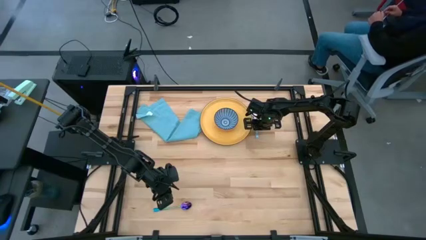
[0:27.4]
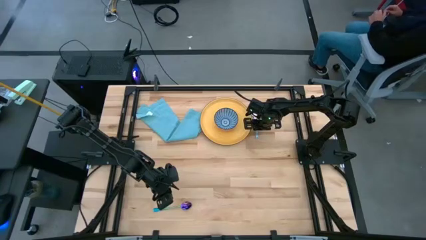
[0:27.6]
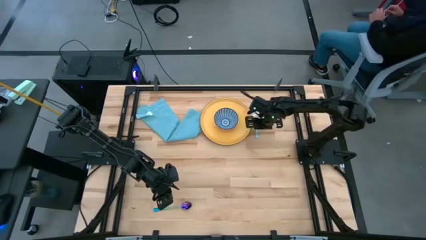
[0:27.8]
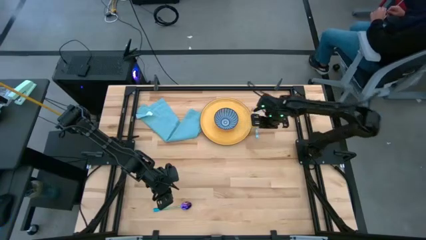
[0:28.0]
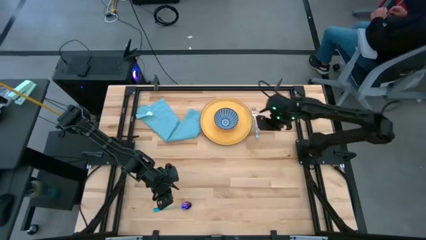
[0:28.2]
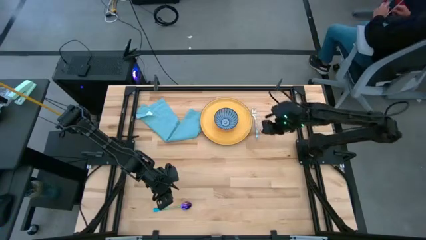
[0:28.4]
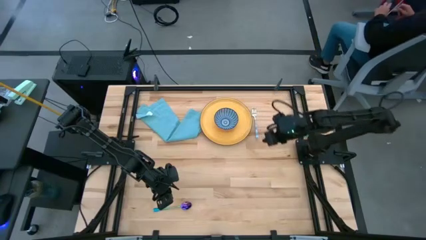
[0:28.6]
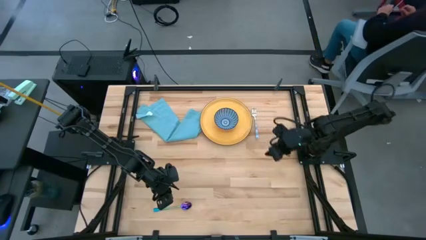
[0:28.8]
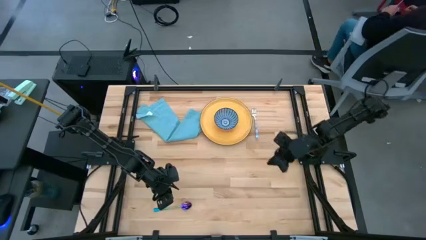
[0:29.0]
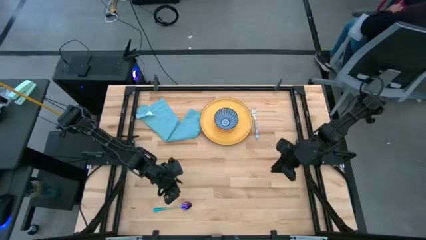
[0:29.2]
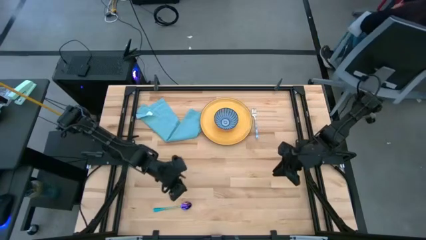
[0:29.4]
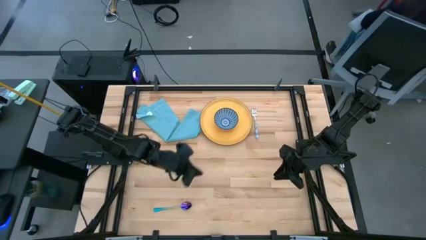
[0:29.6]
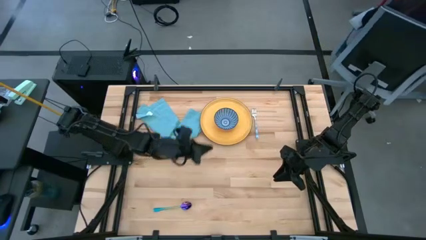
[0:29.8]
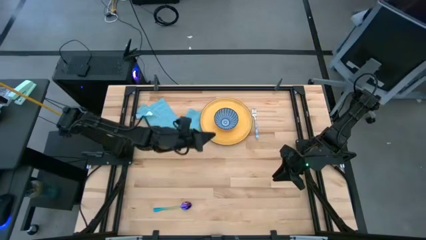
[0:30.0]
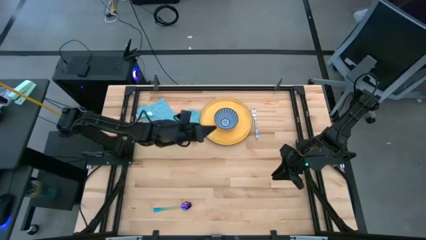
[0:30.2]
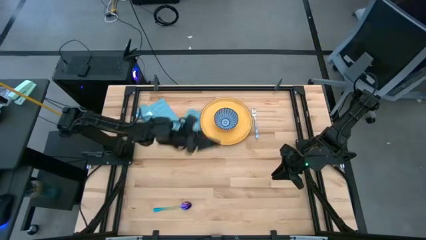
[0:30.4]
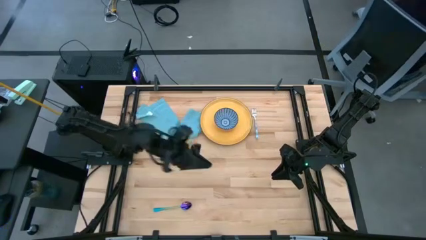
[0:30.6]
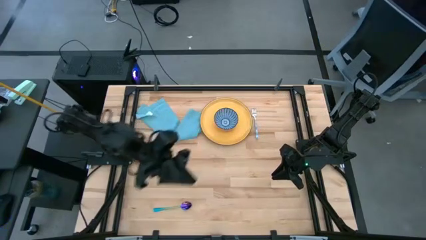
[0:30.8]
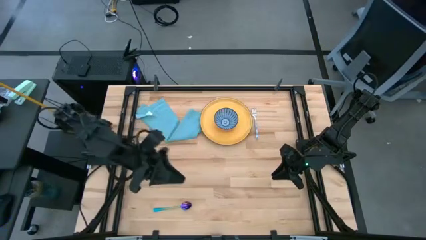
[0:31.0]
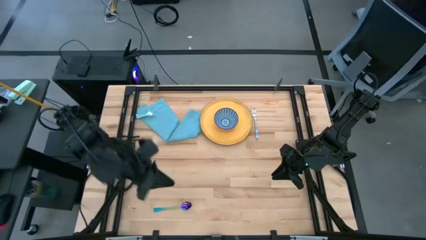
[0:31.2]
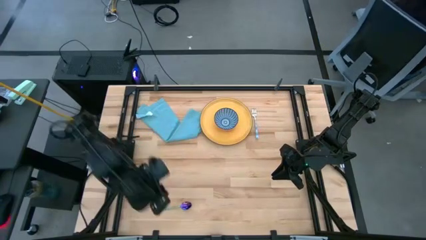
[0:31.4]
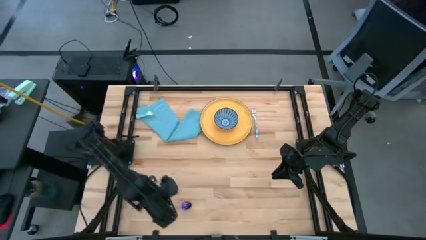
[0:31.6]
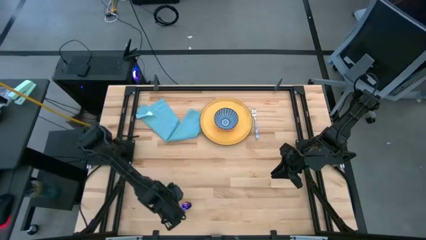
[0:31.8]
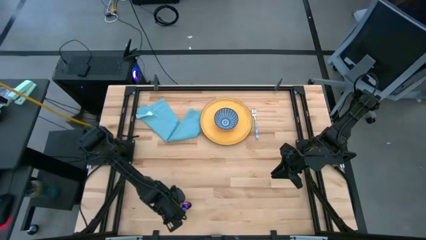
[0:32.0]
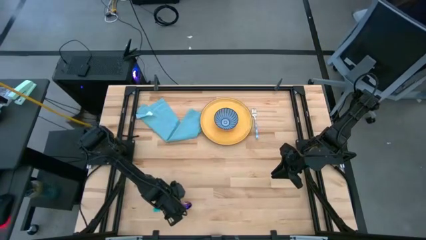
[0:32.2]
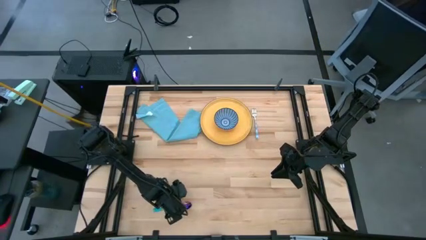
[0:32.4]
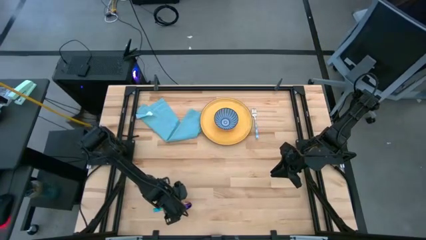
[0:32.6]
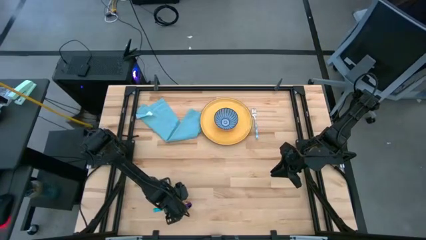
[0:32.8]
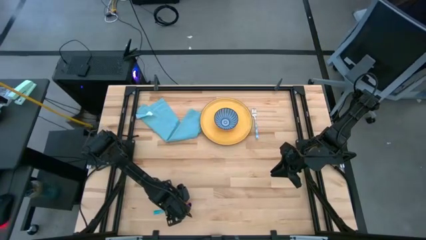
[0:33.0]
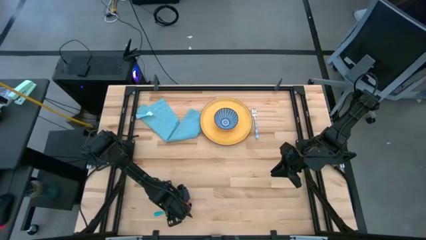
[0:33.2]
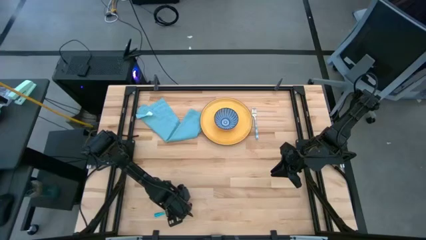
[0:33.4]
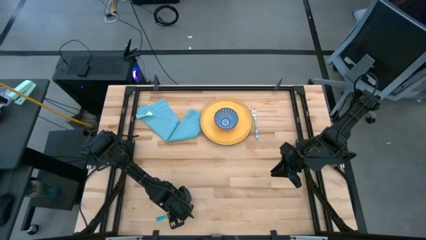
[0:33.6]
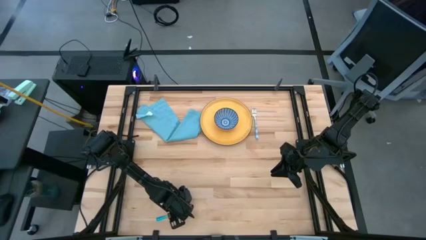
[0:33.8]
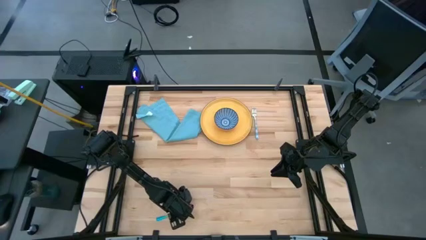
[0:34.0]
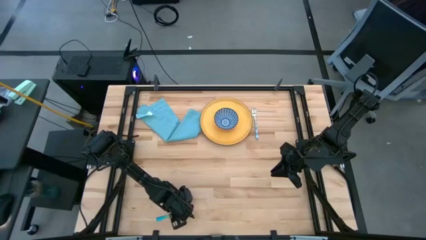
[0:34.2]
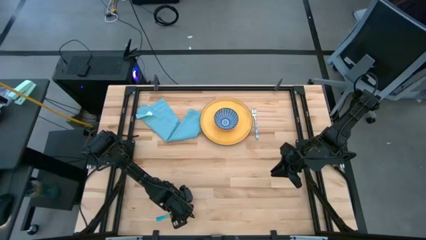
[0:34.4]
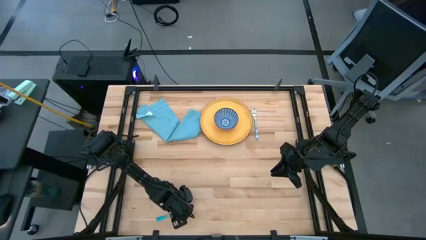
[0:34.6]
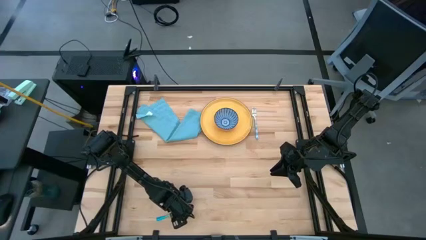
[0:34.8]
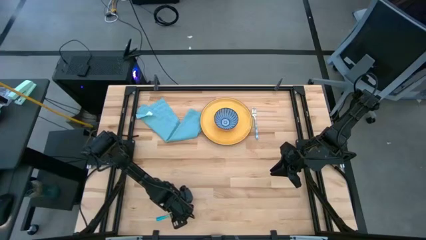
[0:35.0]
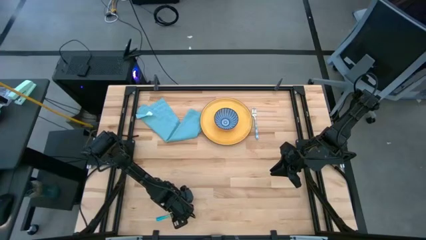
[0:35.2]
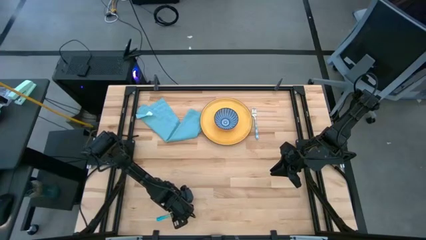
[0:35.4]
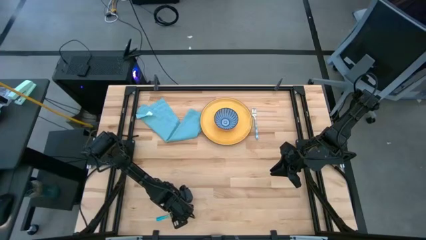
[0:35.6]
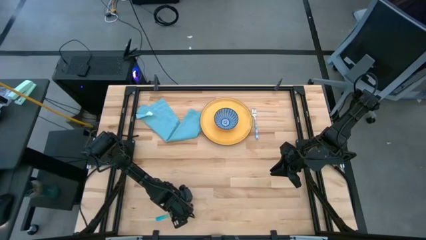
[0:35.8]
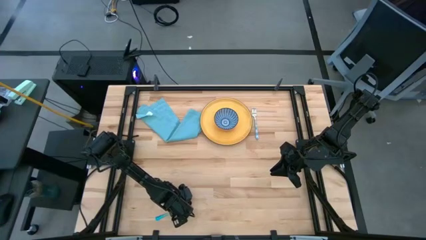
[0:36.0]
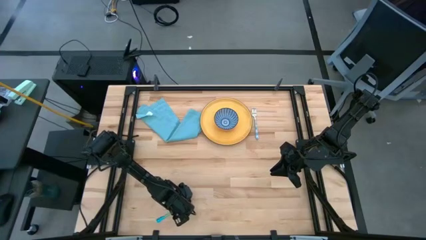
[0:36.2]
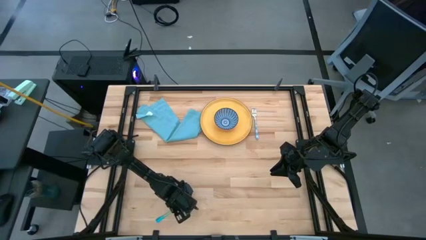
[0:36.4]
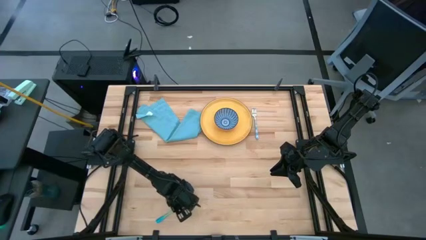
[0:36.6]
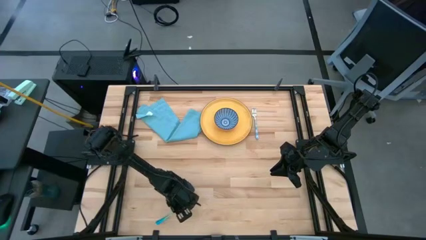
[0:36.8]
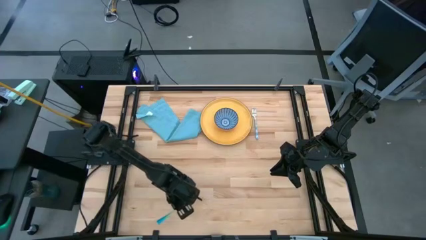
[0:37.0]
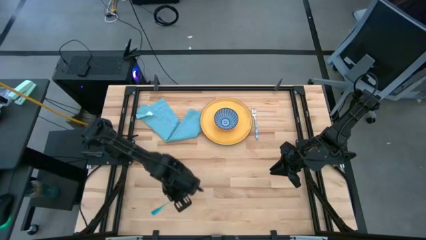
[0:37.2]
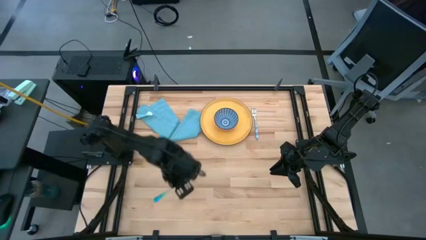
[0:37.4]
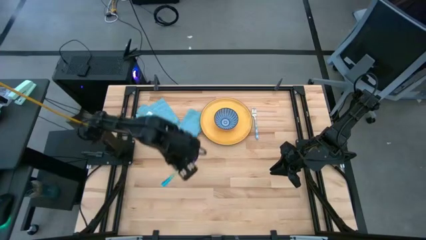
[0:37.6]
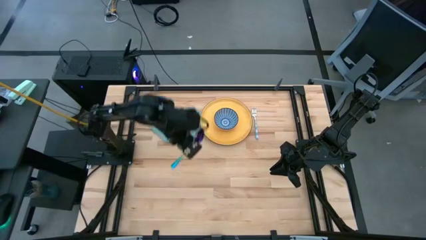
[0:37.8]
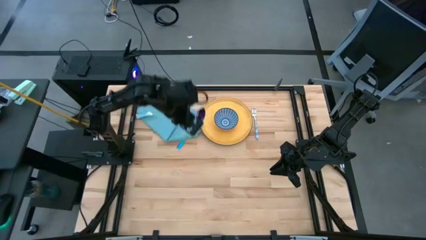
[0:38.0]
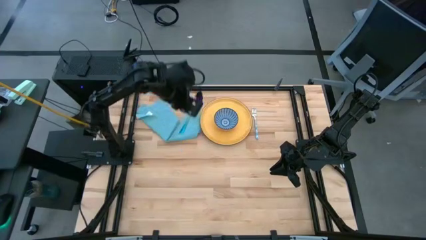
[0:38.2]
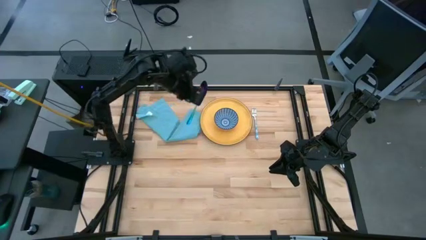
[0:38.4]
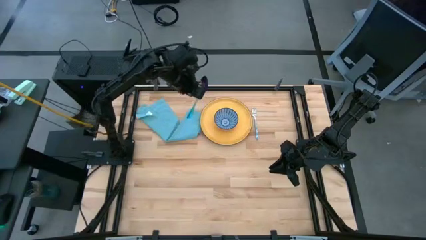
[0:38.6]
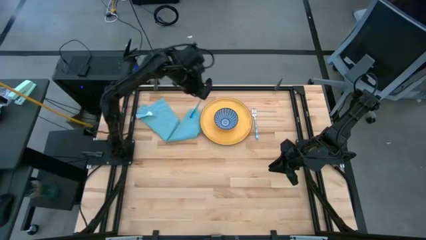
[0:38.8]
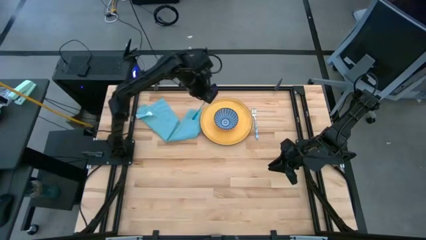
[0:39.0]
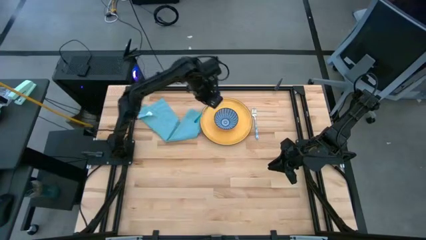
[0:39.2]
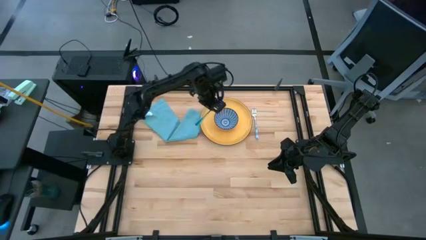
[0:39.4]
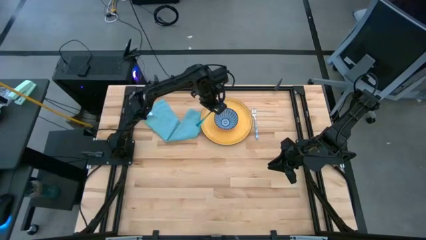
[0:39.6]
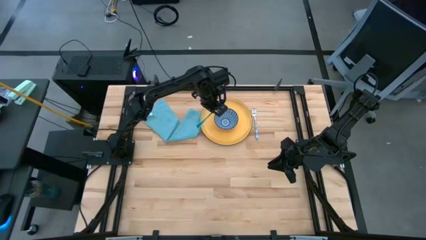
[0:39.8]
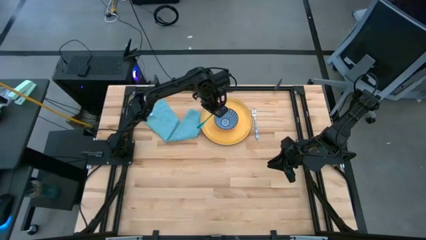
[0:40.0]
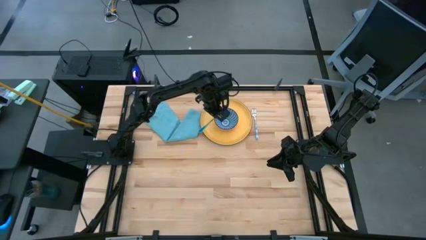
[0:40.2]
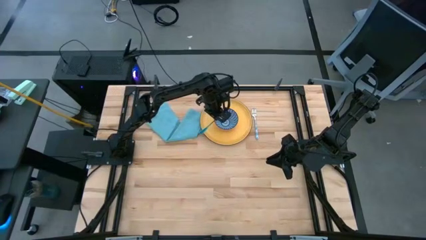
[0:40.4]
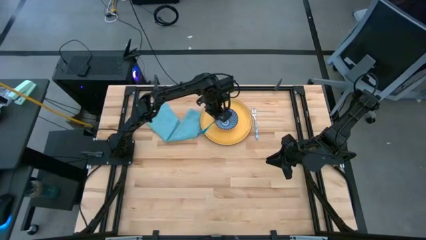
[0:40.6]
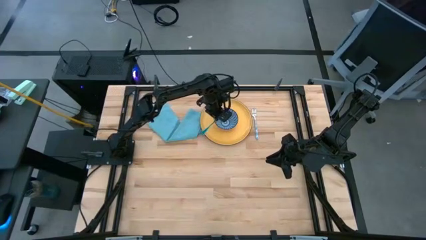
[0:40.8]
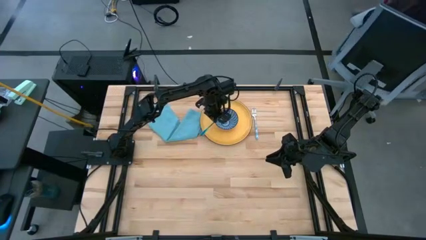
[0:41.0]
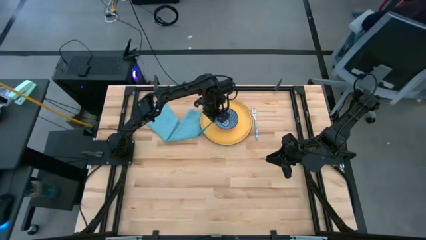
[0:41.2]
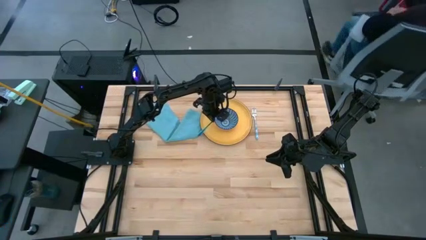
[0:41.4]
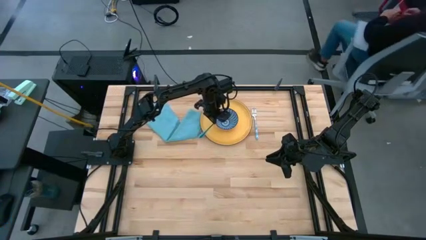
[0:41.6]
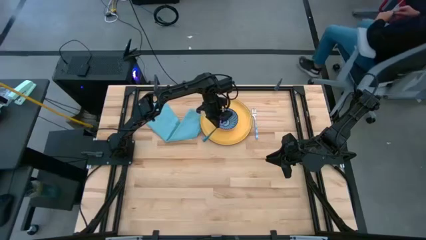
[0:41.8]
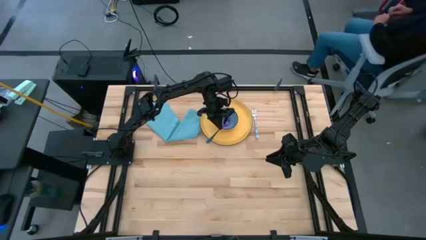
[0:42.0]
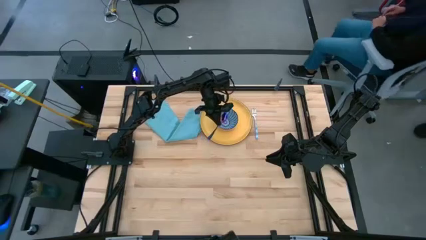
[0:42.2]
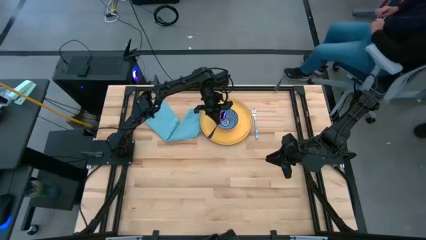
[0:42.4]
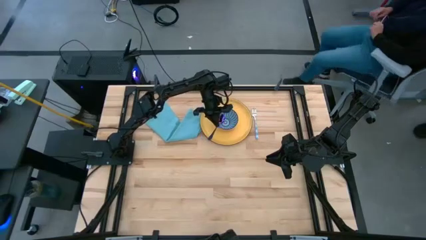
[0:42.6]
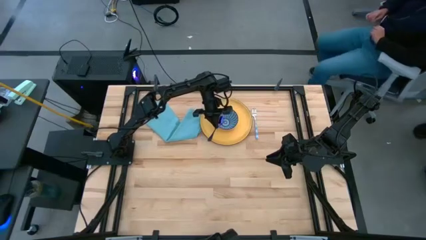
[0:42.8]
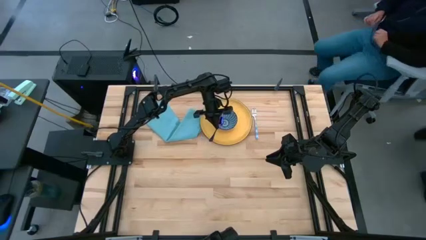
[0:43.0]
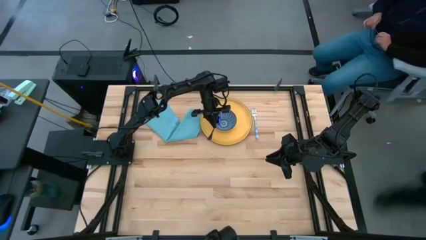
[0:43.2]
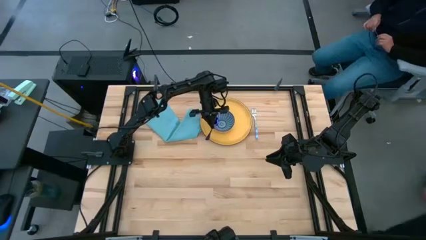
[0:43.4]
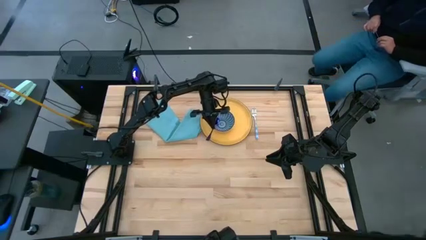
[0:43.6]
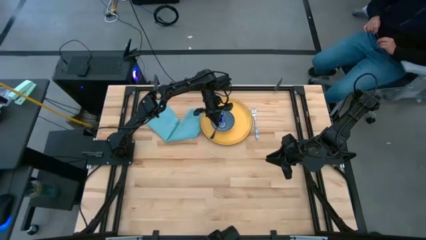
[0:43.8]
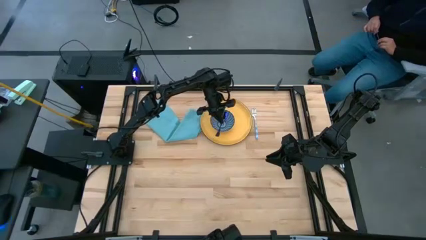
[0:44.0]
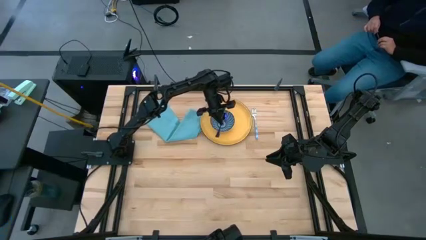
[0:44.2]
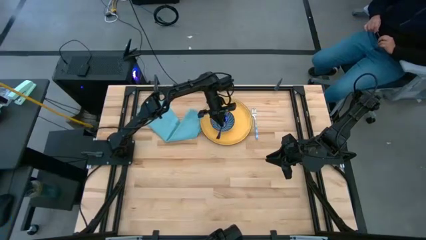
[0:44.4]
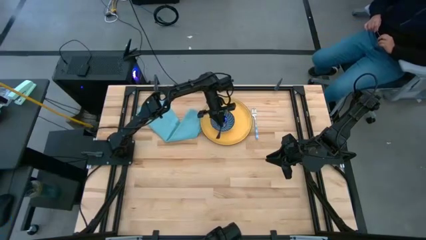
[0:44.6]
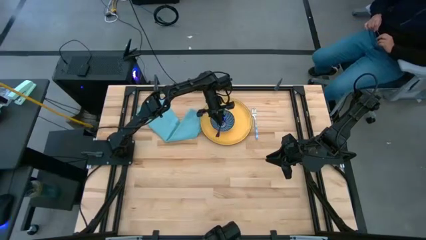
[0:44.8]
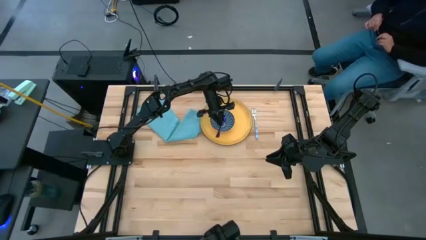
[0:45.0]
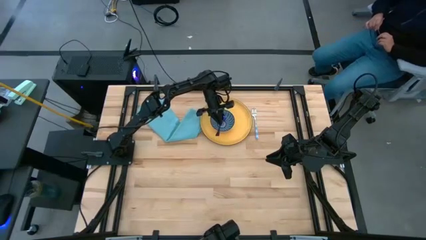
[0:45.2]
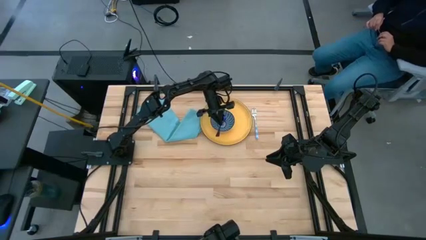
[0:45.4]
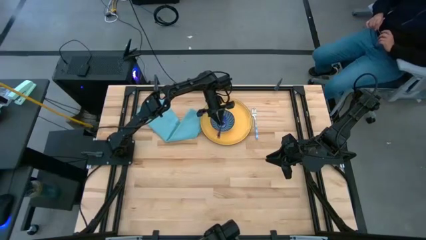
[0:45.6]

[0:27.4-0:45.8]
Task: Set table place
Put the blue spoon into the blue bowl
